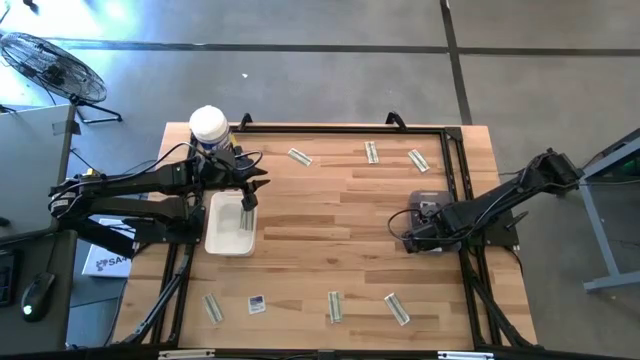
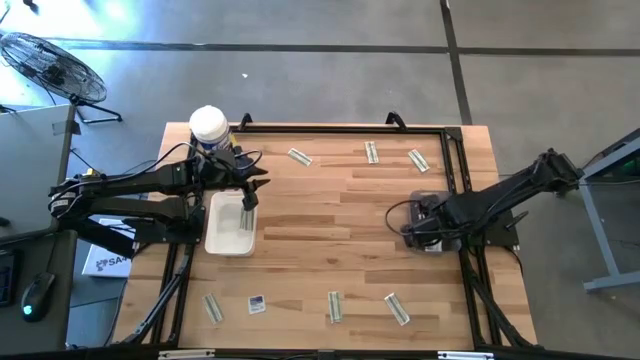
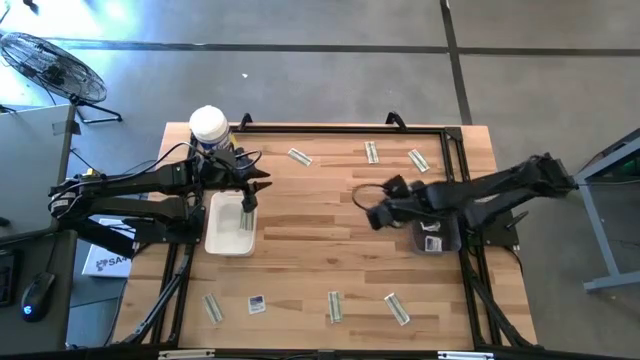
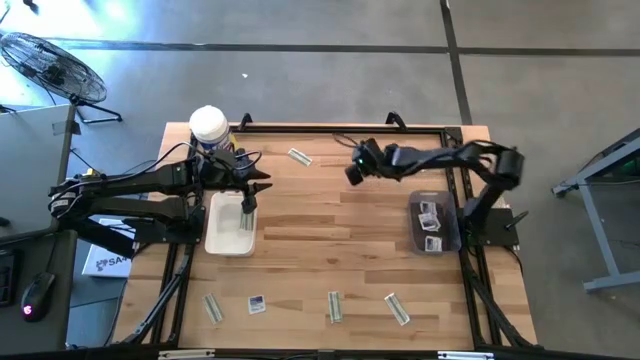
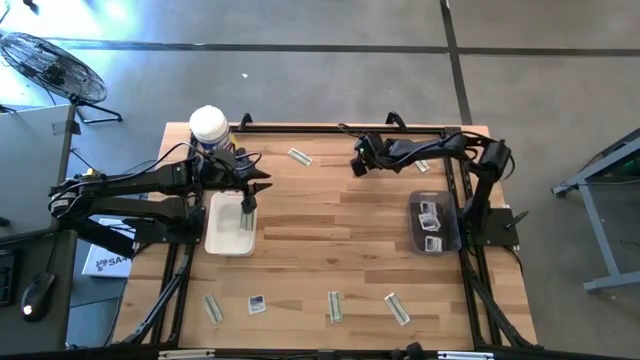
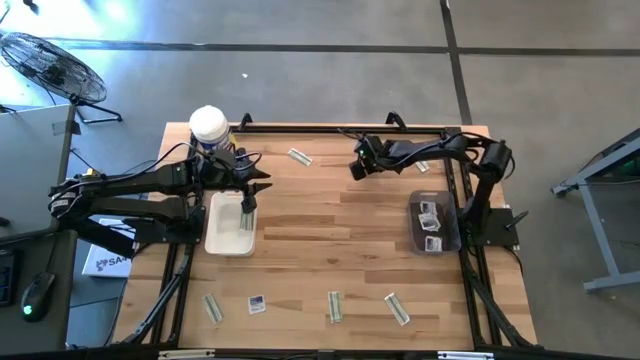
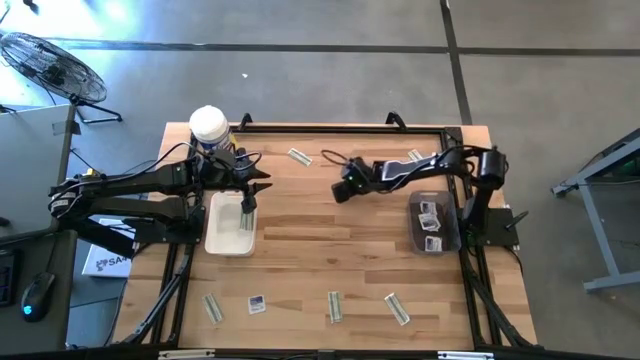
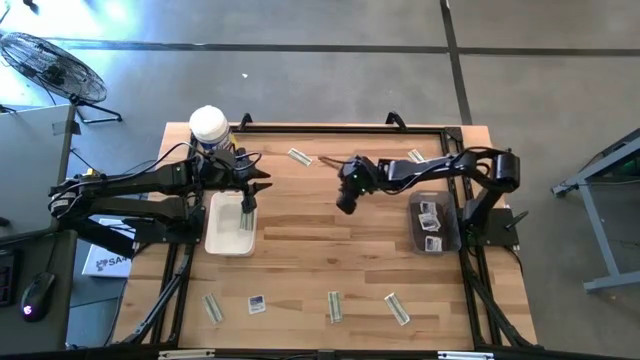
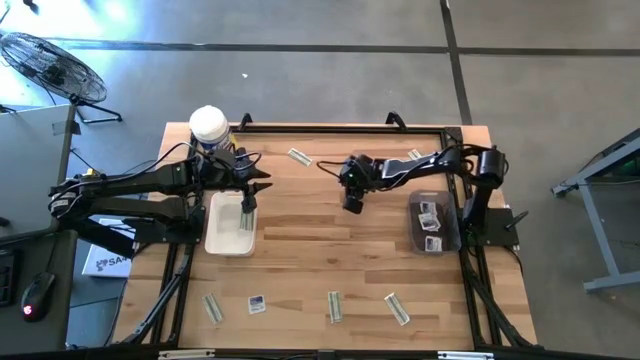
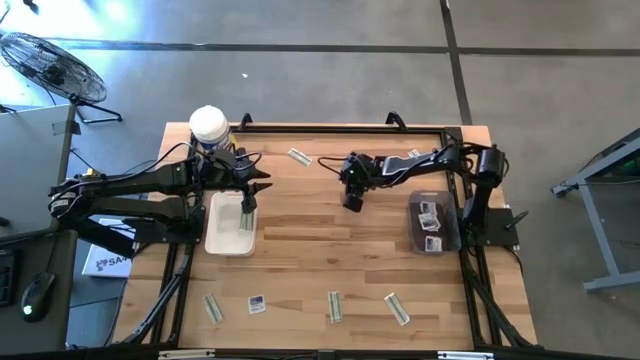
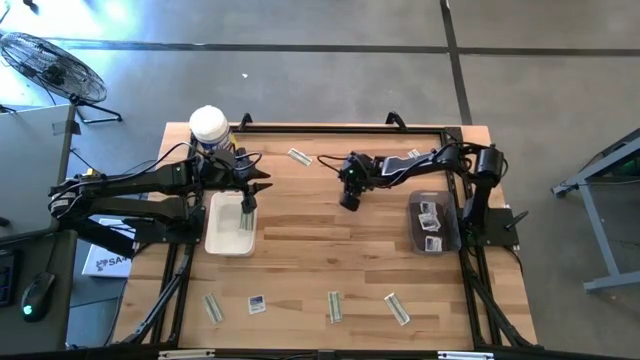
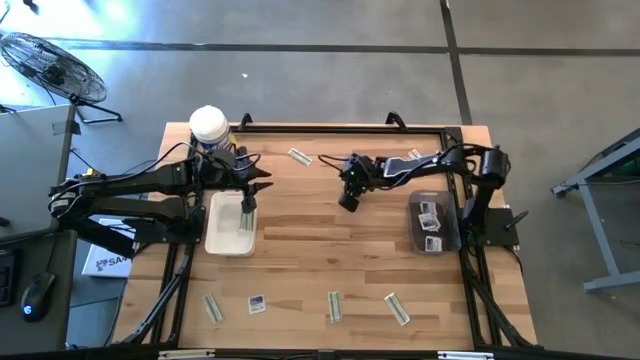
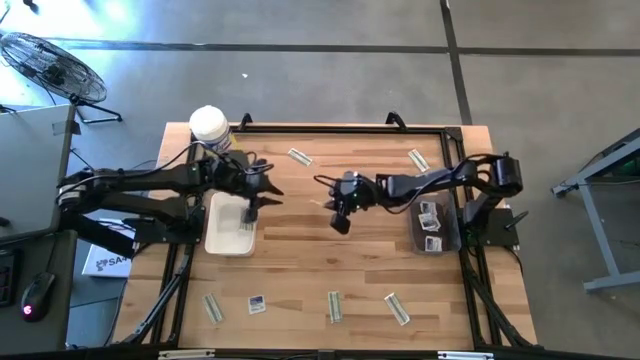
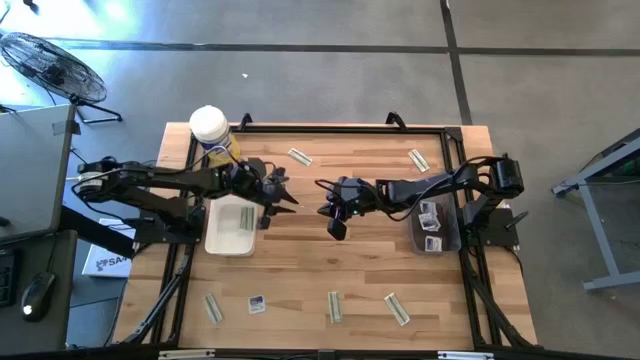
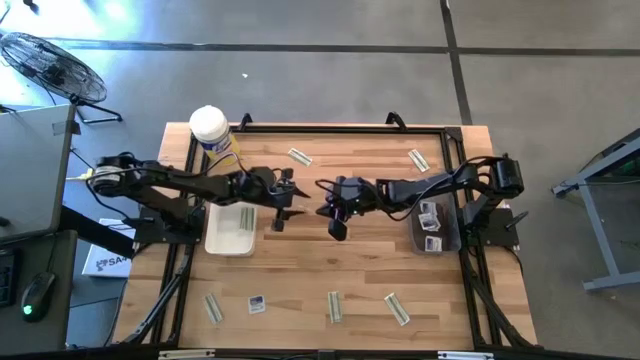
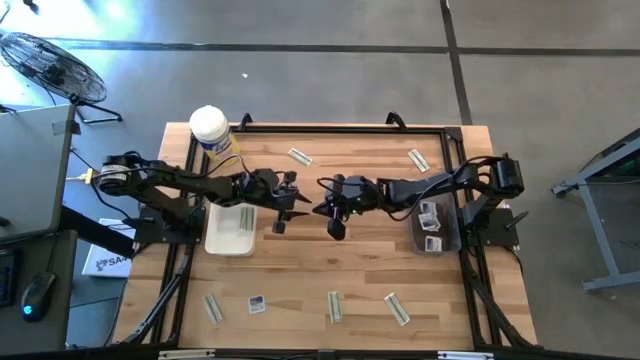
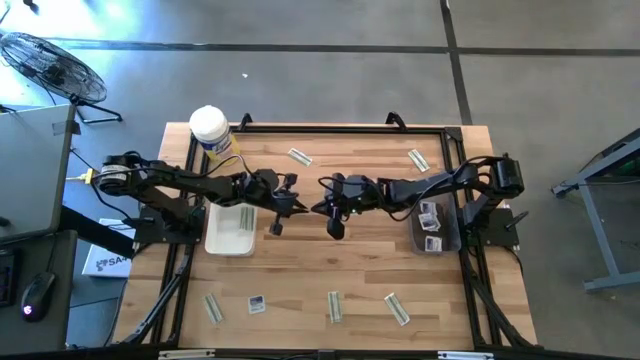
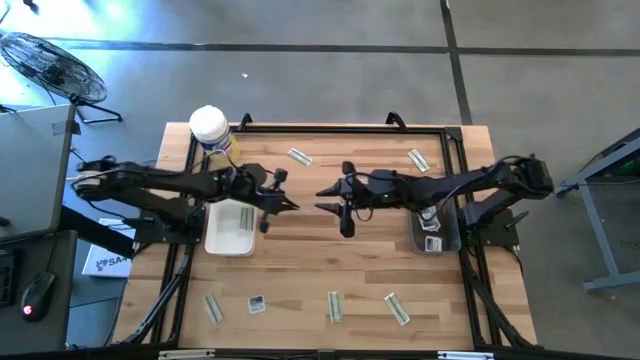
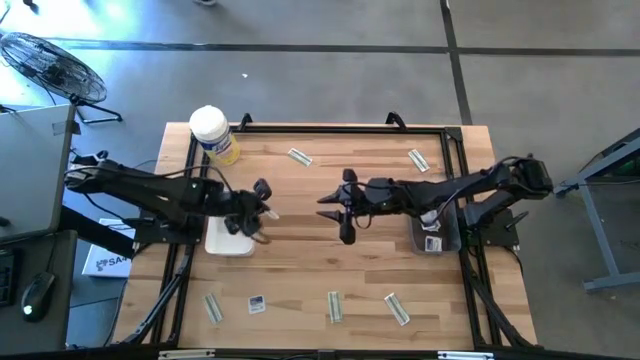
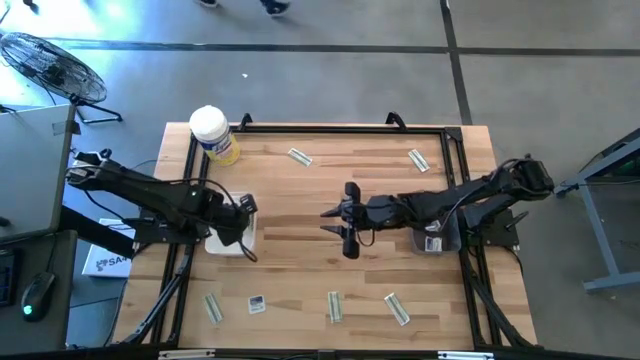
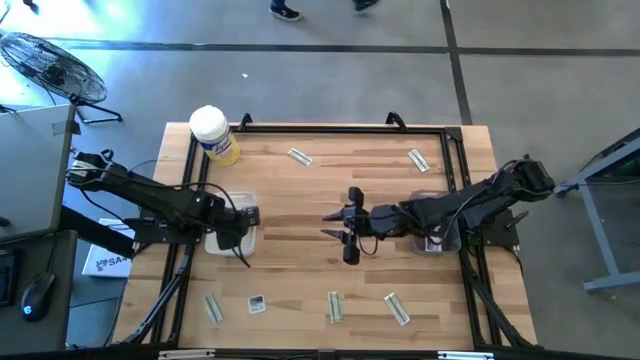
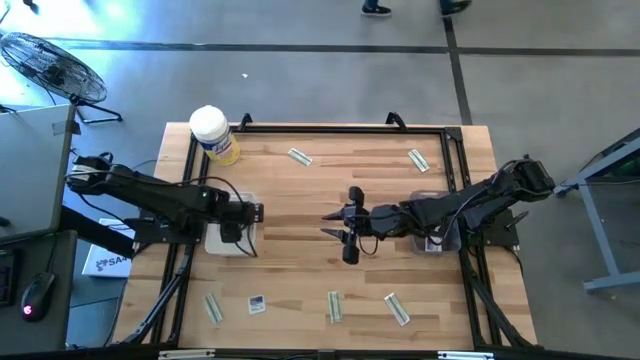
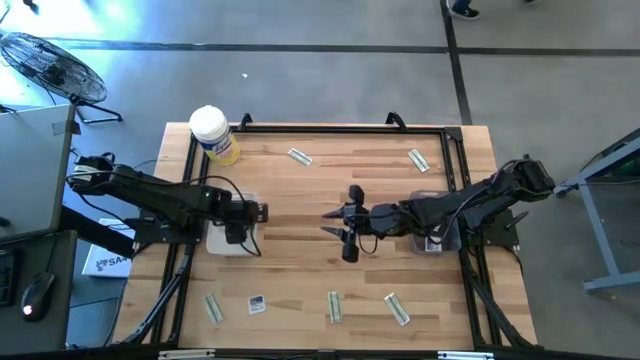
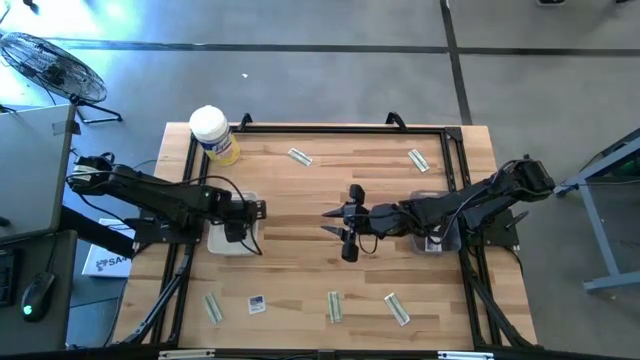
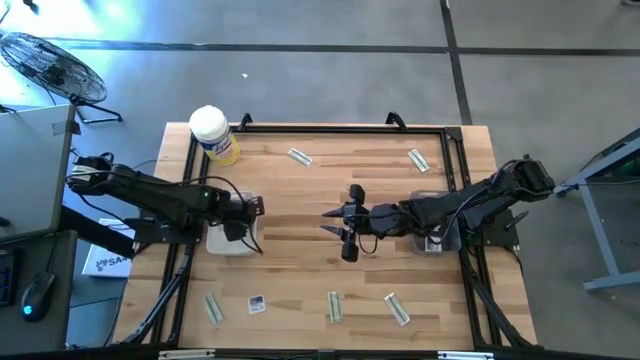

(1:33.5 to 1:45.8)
Task: Pick & Place First Aid Supplies
Put the green bandage into the white bin

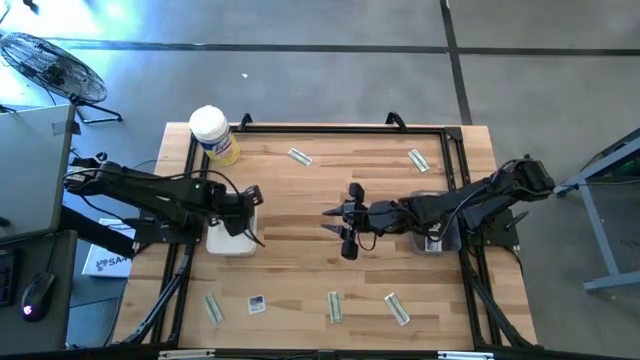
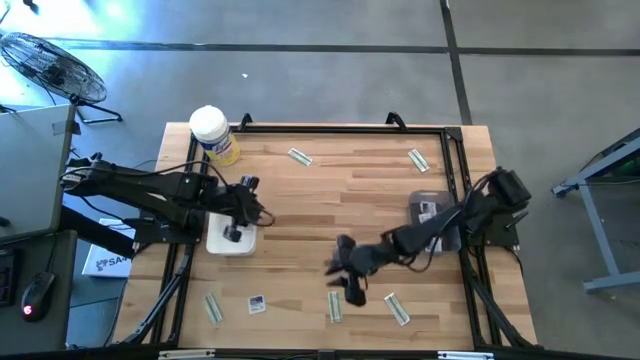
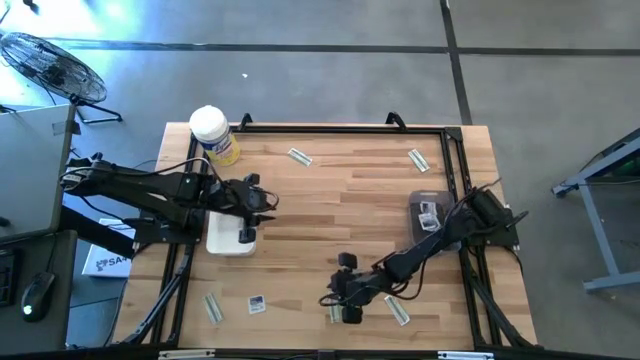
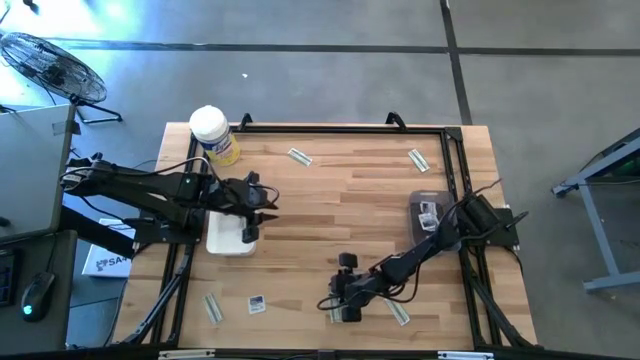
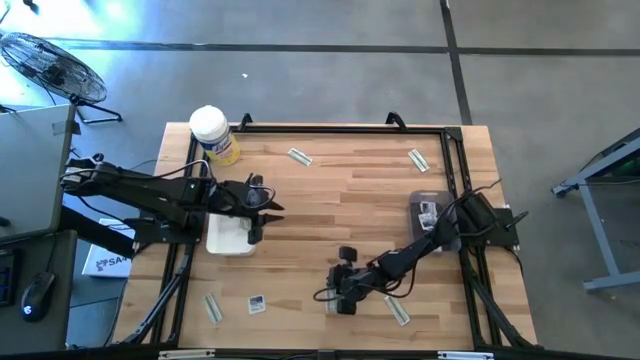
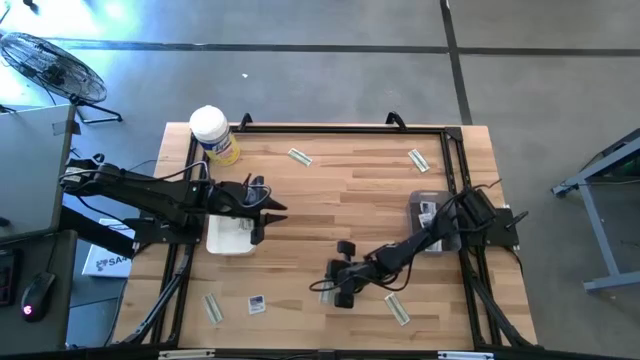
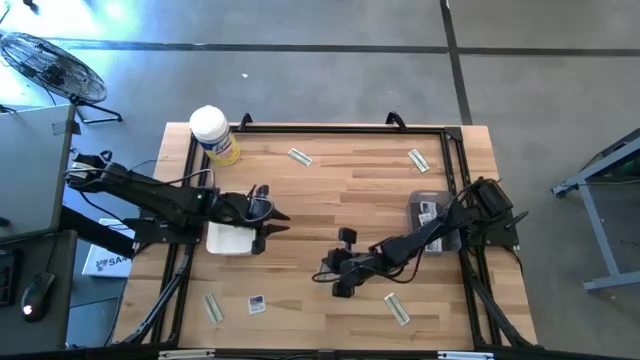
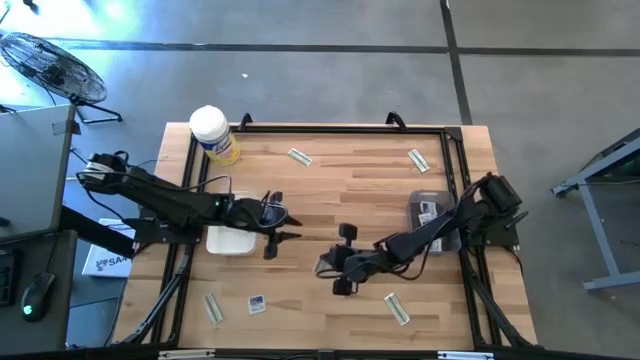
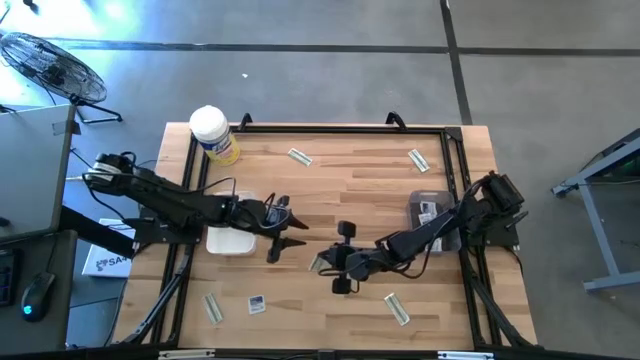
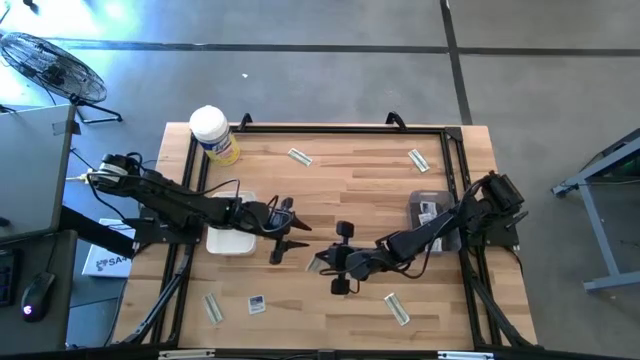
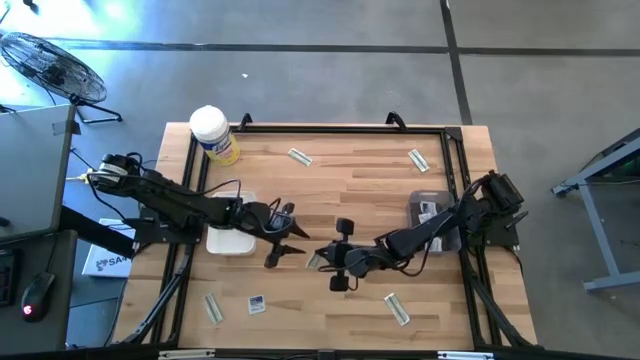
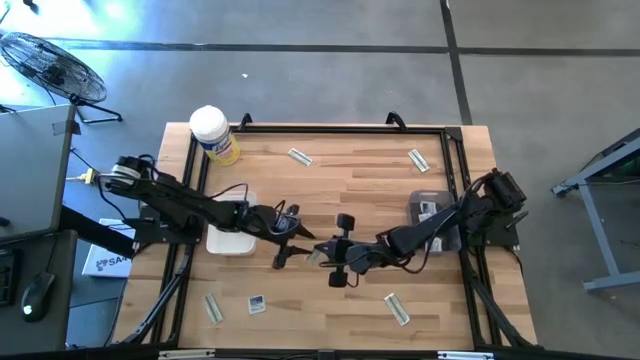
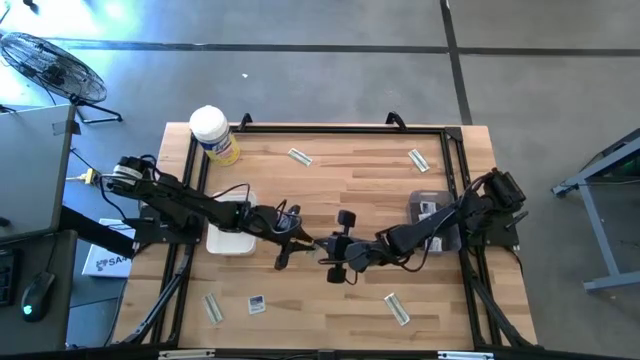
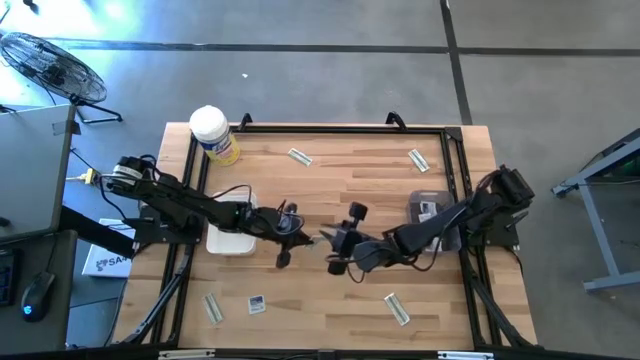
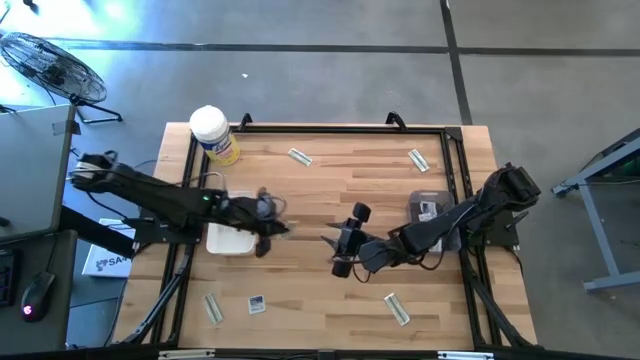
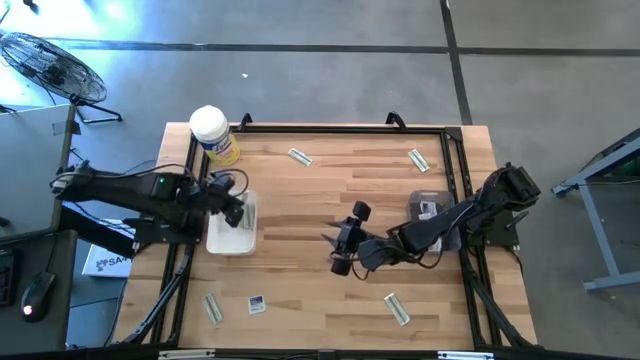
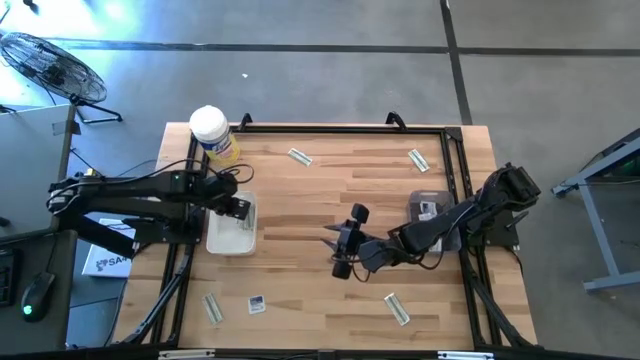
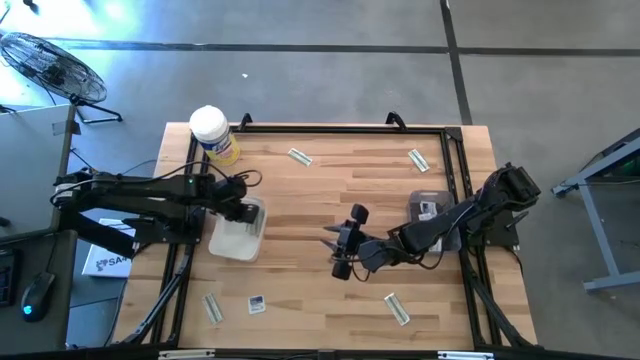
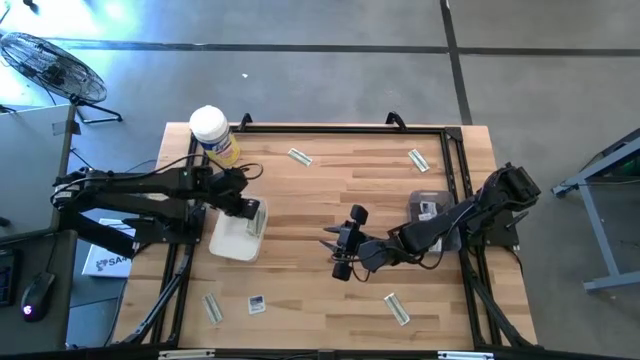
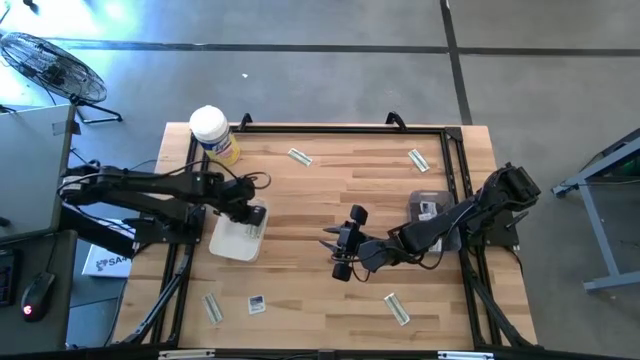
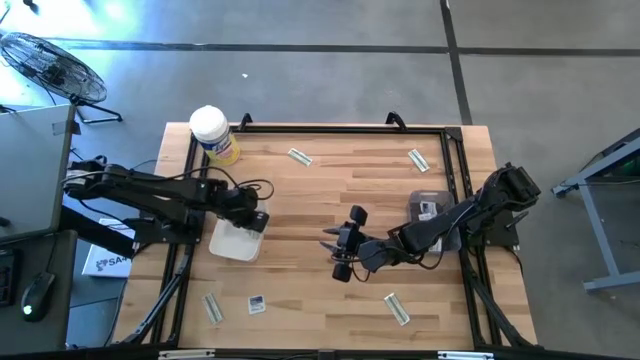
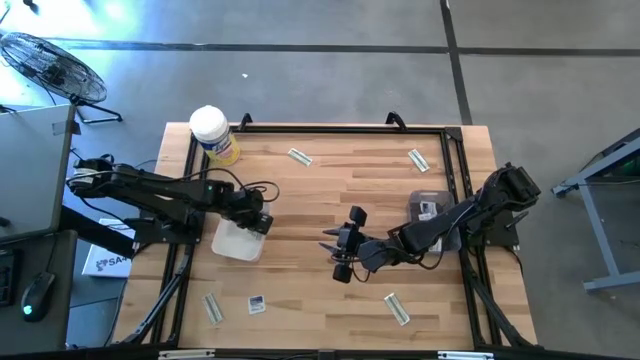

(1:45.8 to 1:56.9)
Put the green bandage into the white bin
